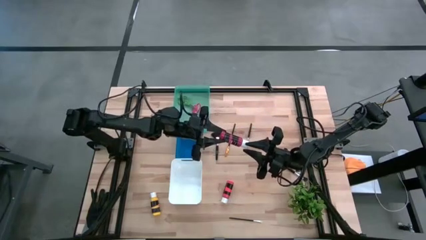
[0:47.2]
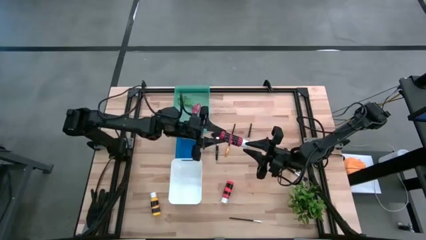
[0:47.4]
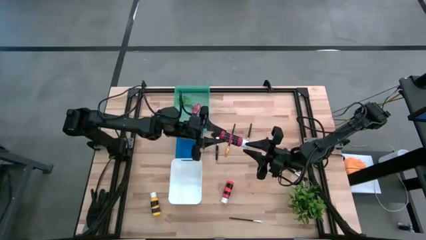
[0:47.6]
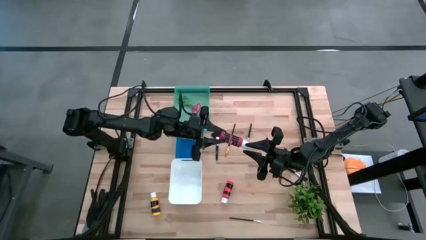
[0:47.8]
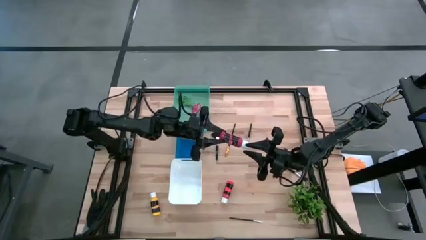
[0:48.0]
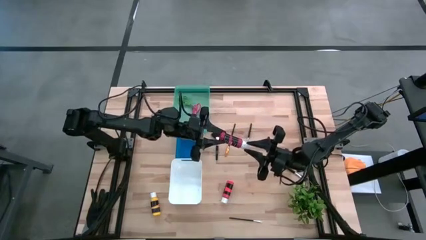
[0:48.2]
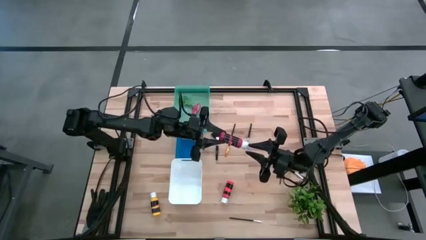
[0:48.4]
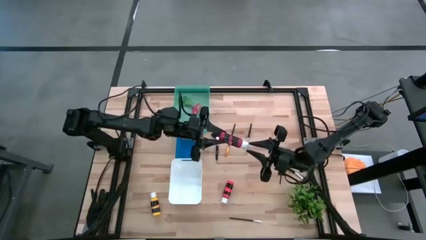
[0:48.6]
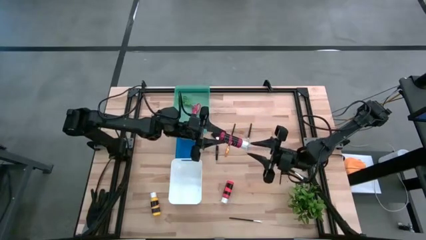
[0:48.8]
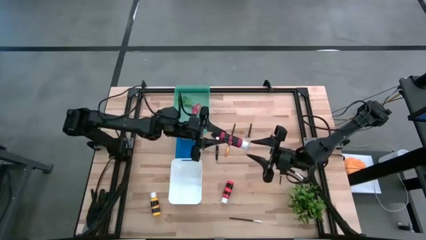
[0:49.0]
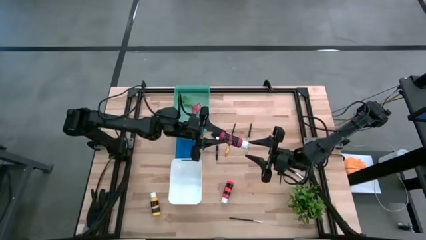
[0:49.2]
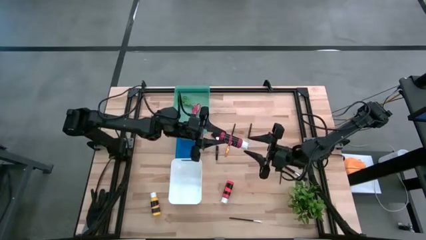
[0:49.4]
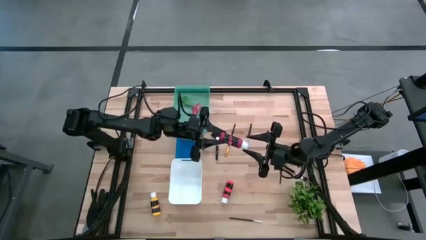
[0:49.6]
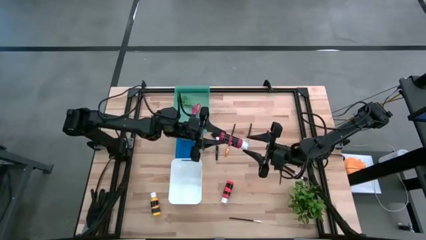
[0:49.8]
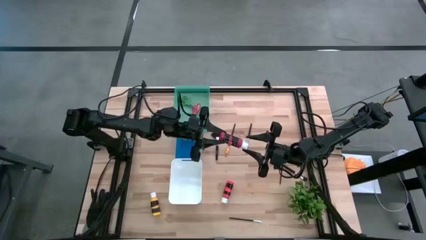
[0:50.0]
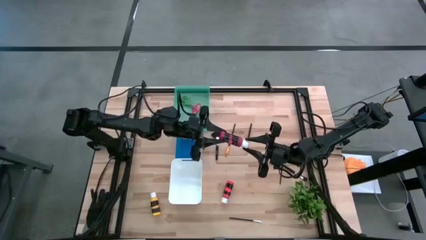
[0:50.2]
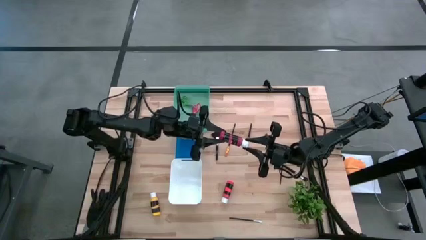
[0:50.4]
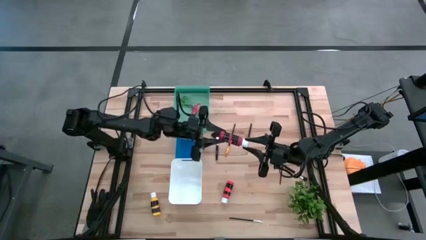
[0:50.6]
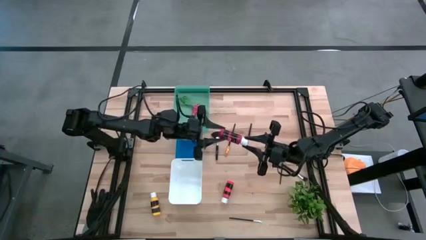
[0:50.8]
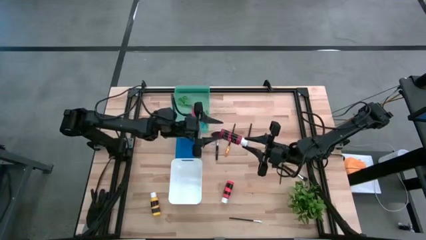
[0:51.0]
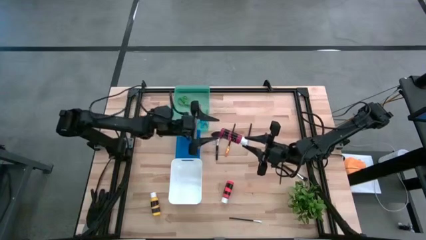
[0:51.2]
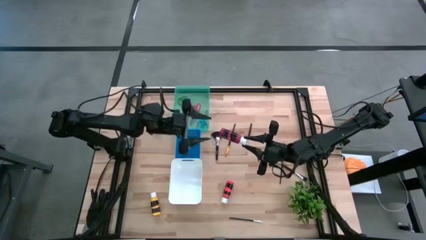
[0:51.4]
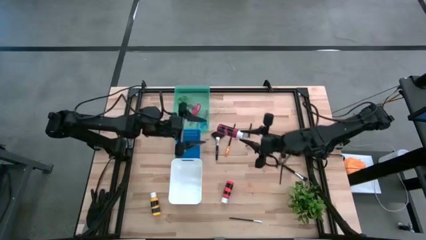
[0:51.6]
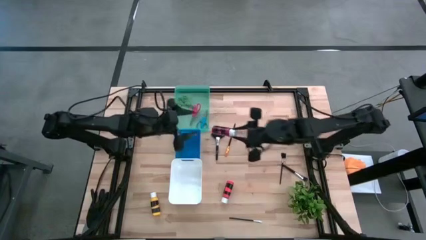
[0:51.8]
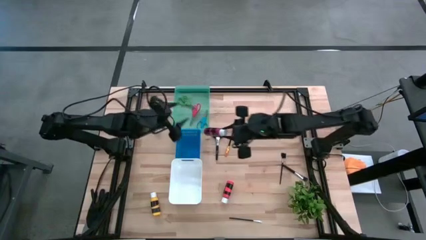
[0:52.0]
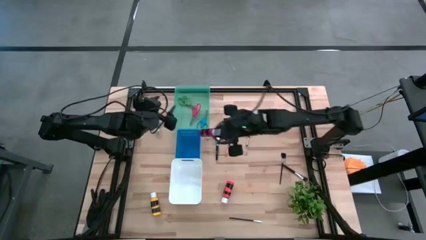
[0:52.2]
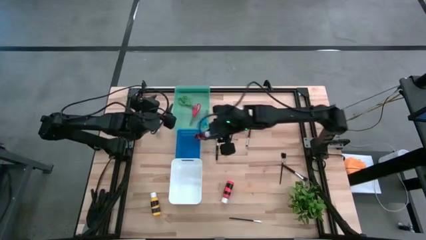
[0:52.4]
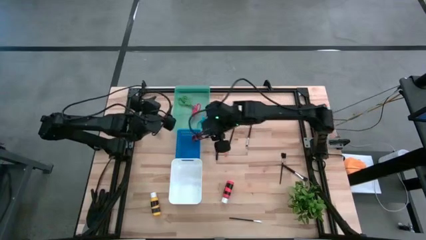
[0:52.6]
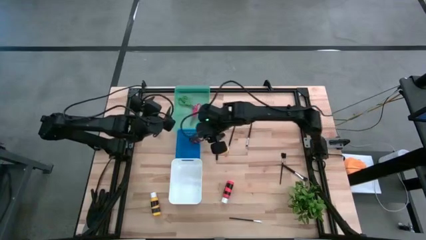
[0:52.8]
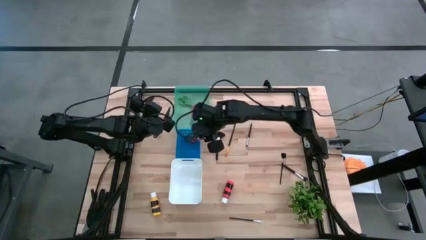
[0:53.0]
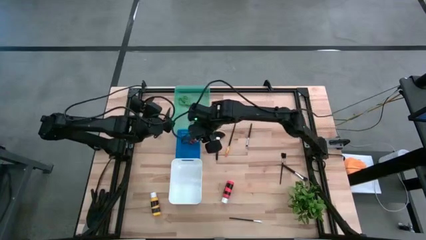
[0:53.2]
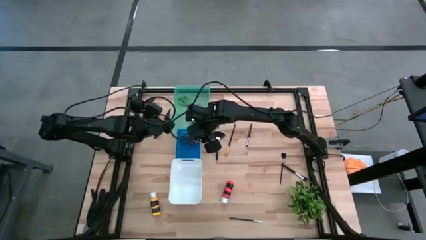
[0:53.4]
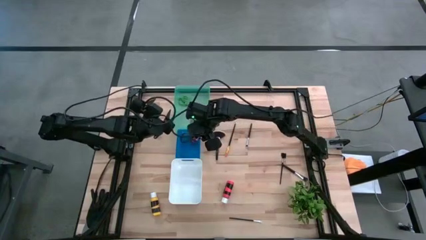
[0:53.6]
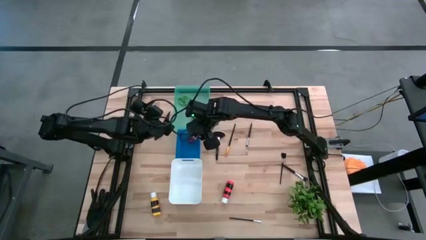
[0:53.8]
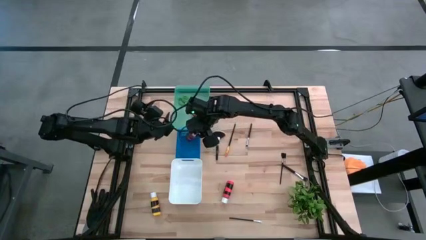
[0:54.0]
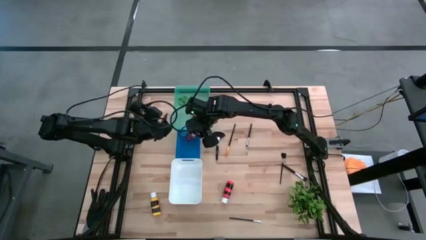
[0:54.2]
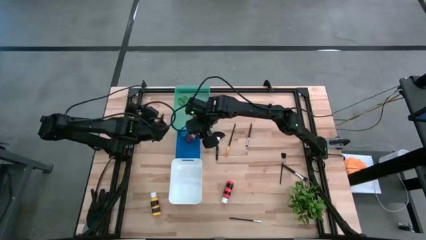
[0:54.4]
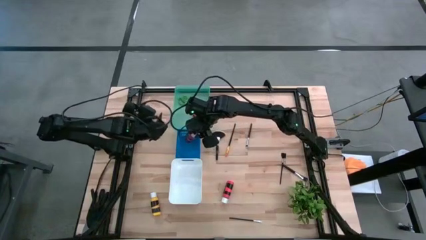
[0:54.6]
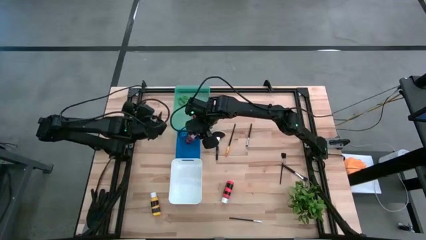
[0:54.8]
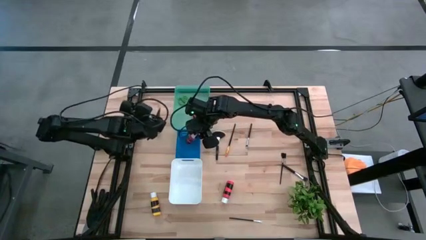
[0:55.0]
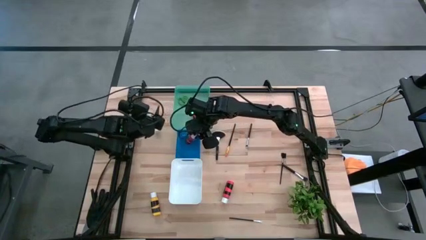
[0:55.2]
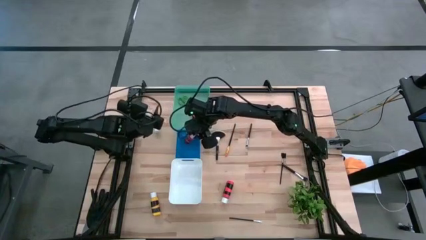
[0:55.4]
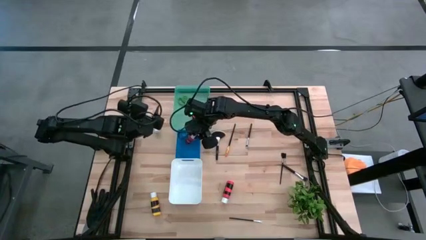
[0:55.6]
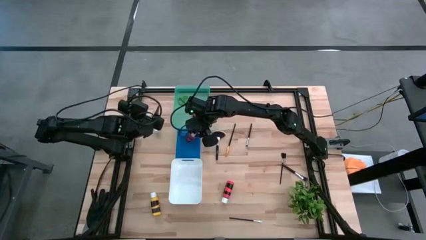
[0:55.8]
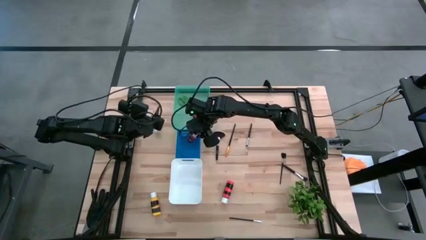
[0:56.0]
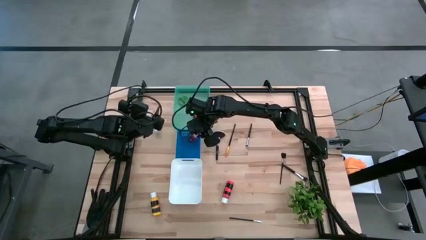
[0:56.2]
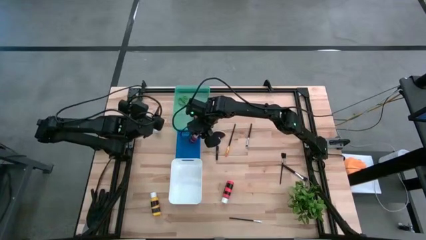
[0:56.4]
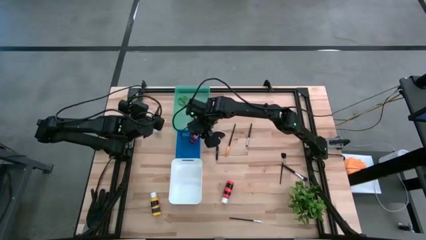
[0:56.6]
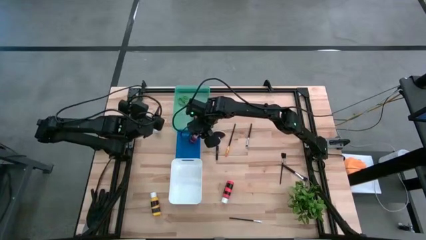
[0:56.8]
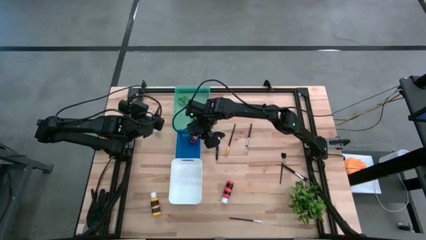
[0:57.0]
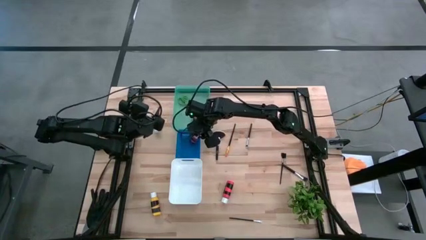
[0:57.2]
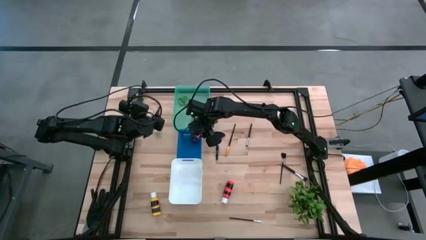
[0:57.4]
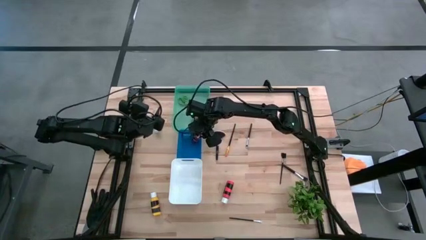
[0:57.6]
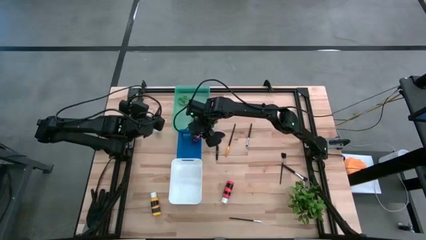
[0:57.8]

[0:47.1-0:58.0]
Task: Pick & Place Paint Supplies
Put the red paint bottle into the blue bin
